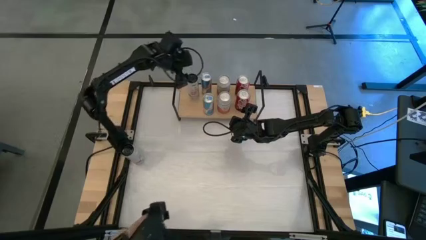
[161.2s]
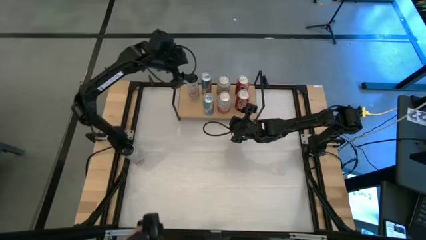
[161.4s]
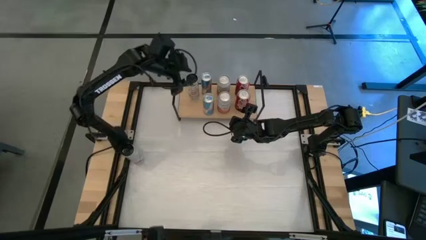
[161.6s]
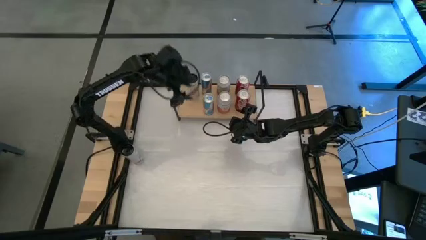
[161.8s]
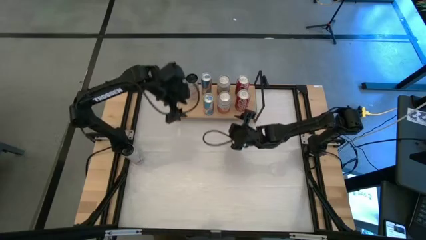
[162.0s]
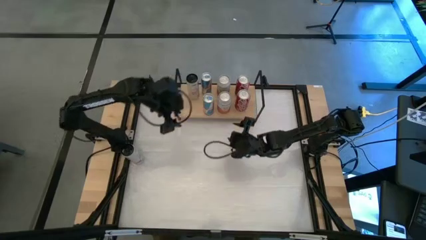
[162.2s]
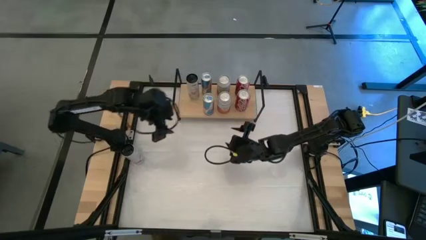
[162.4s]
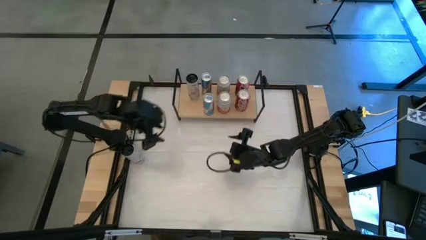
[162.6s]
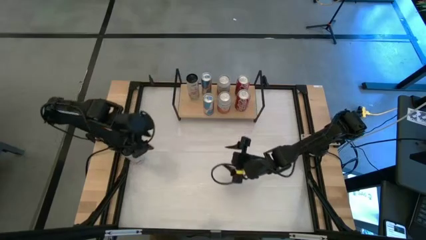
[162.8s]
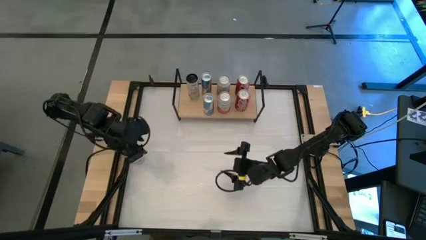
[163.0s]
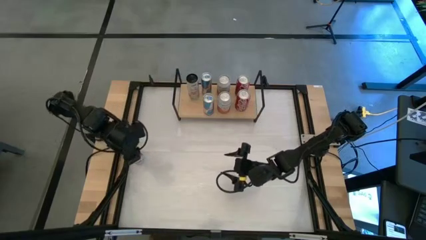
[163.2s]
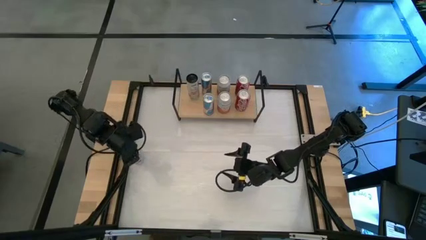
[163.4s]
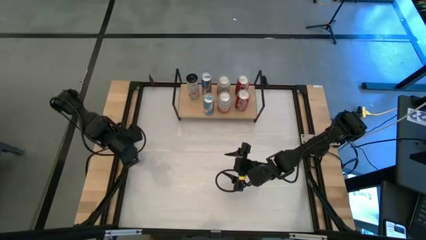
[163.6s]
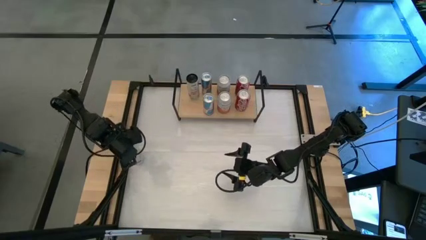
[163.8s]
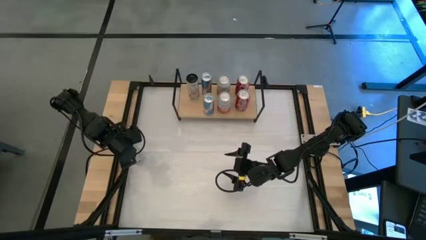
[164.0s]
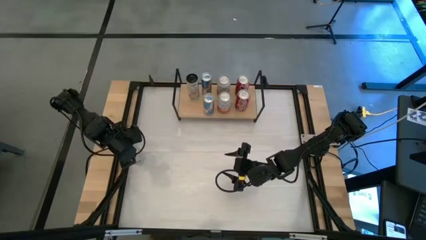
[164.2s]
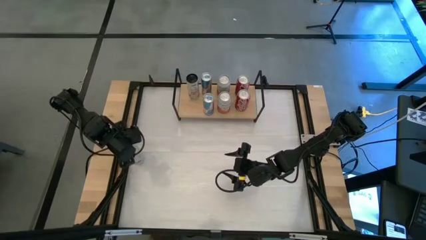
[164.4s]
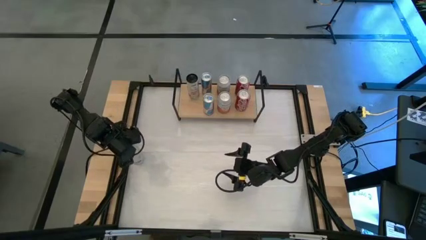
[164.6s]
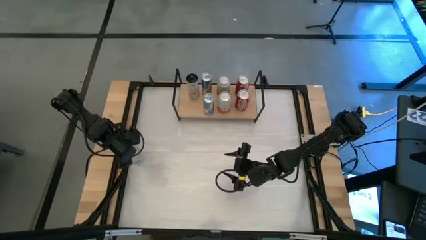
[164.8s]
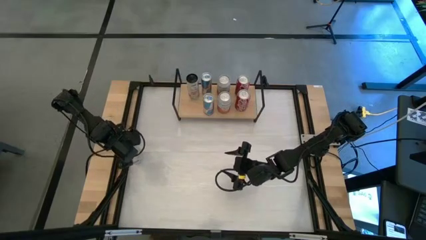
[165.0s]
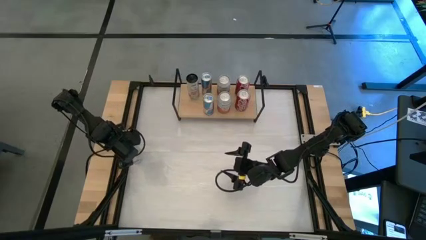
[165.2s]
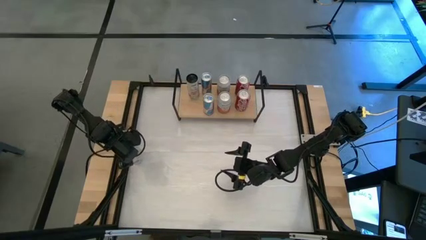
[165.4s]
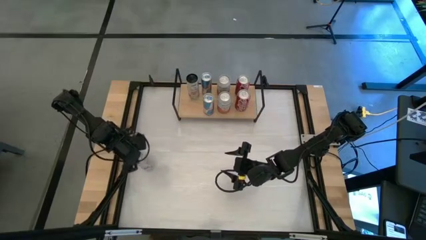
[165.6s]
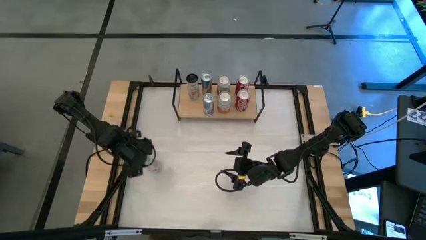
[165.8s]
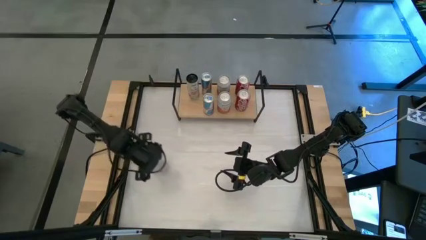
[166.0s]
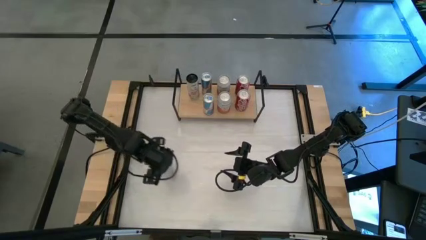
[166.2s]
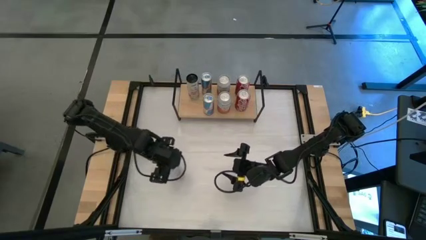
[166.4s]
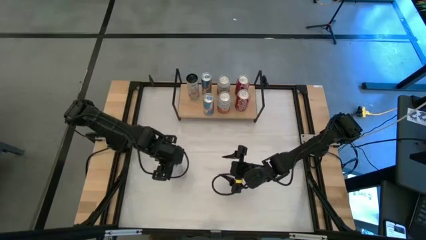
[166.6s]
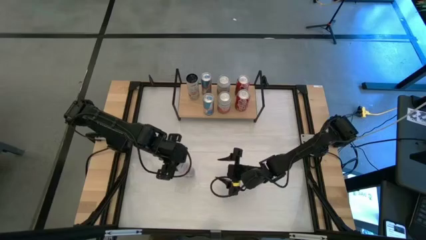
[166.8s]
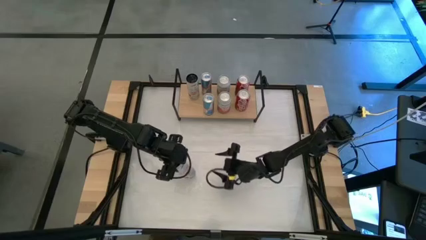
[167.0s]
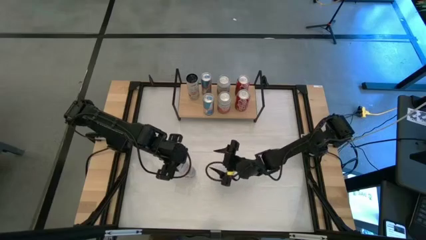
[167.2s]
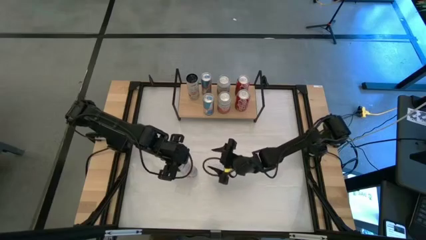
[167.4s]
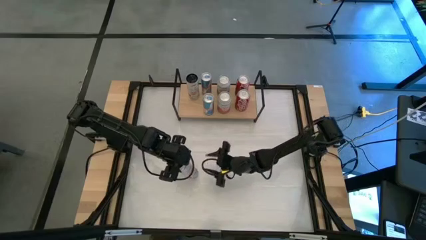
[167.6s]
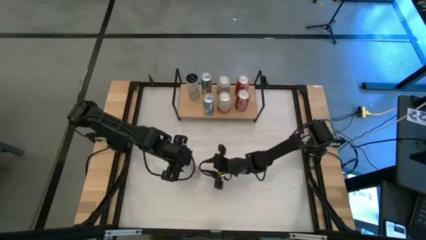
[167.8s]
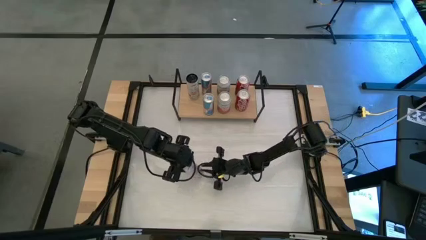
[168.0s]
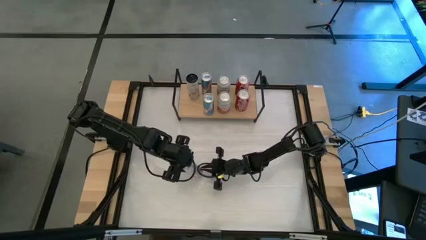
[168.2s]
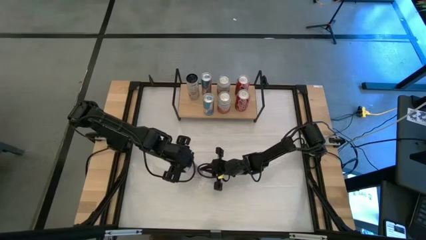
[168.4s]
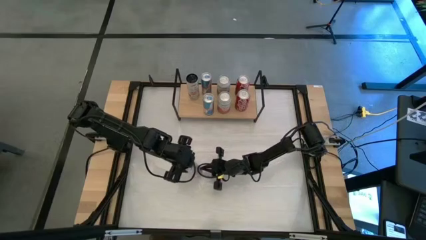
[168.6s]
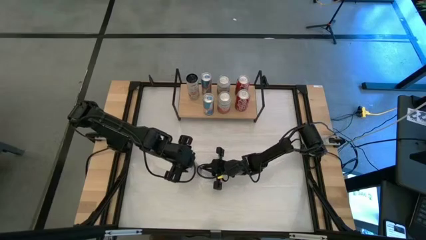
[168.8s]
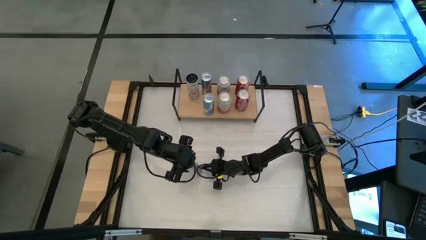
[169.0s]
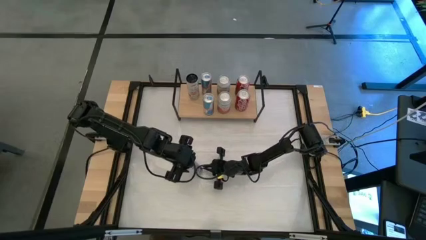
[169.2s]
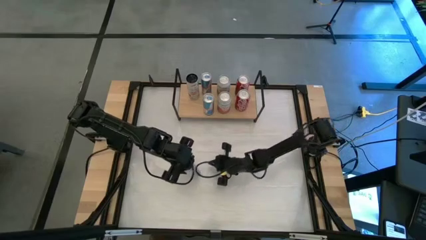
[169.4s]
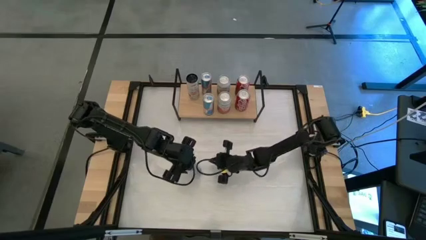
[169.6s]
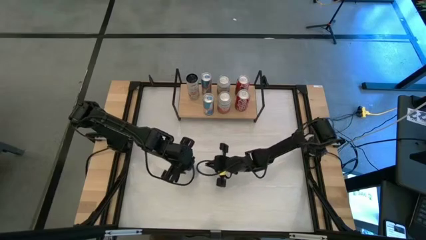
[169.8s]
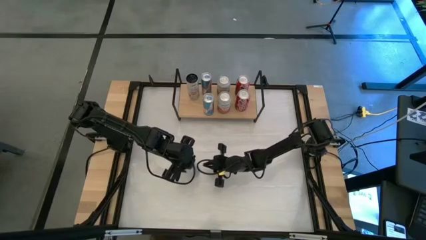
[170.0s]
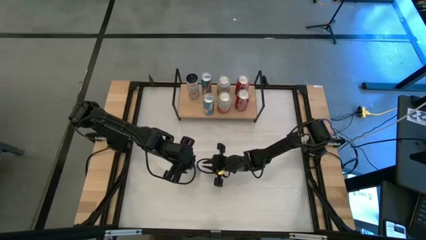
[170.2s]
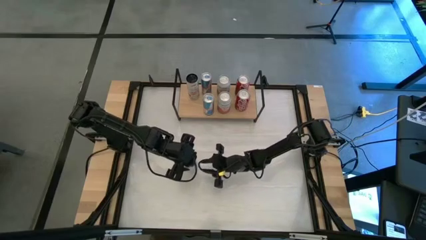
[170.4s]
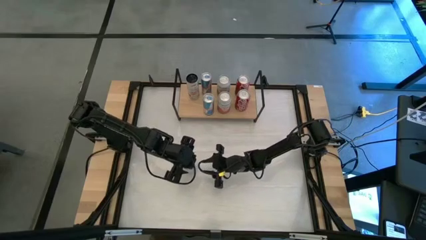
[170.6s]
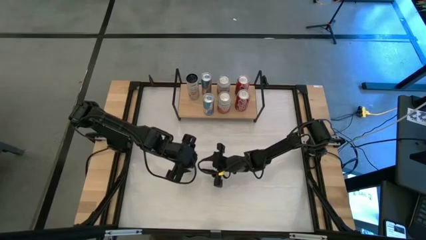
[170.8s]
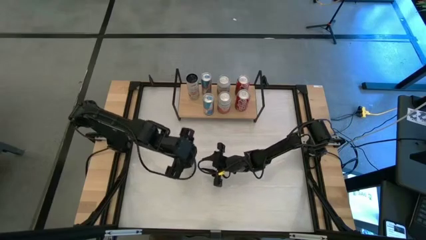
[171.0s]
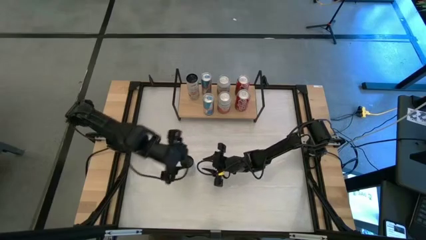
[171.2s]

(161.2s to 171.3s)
Task: Place canned beverage on shelf
Put the white pink soda can align with the other white pink soda can on the shelf

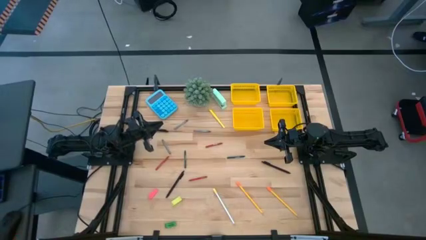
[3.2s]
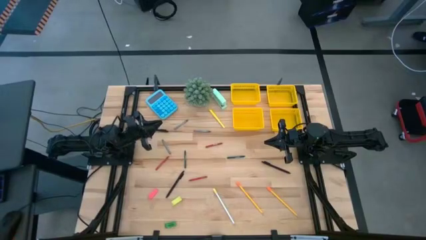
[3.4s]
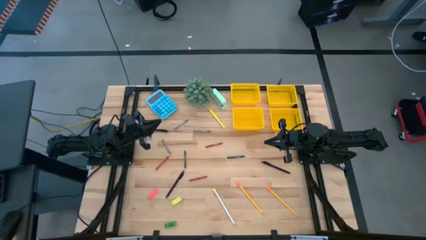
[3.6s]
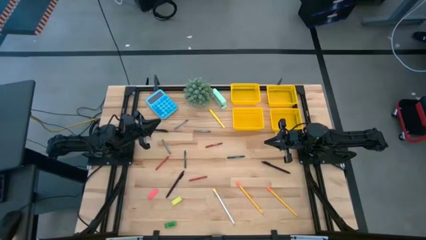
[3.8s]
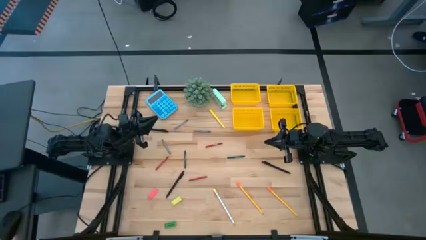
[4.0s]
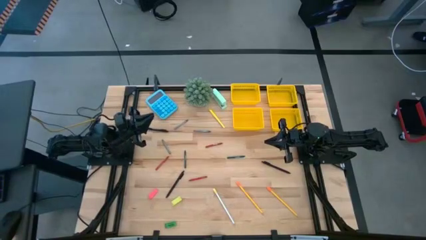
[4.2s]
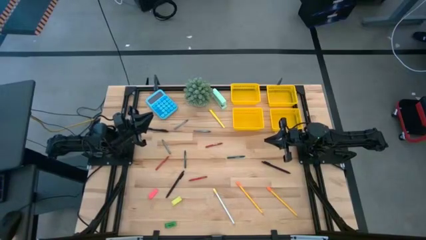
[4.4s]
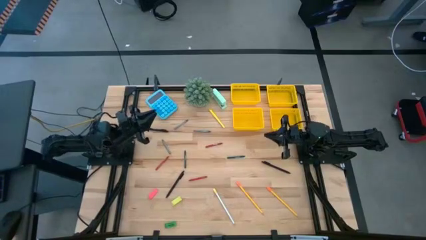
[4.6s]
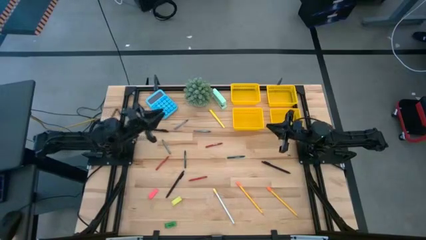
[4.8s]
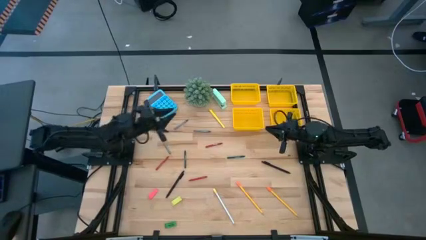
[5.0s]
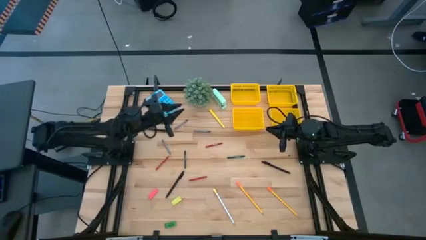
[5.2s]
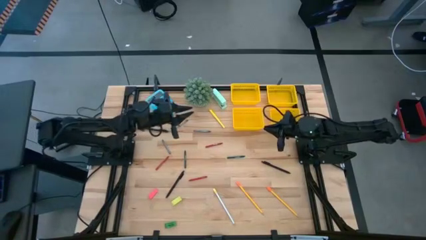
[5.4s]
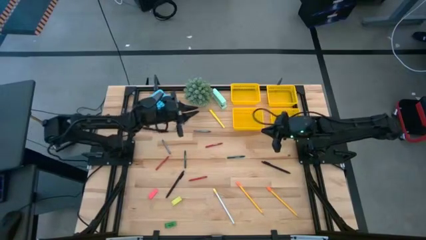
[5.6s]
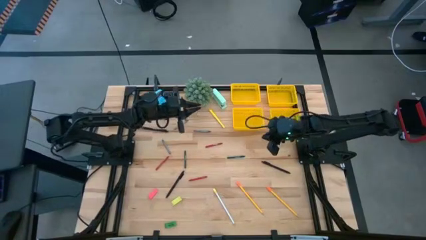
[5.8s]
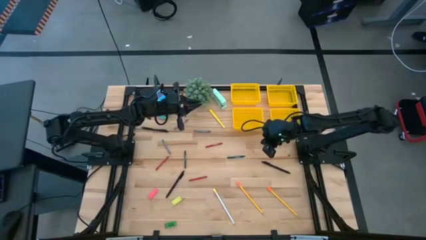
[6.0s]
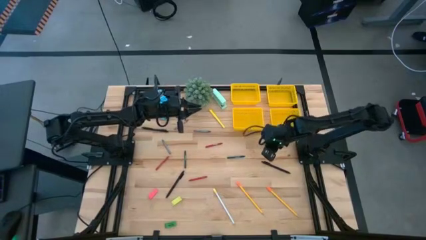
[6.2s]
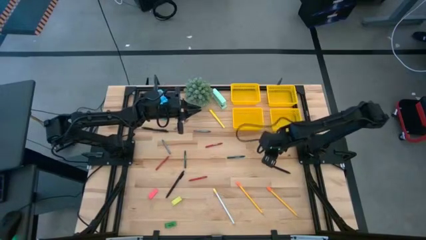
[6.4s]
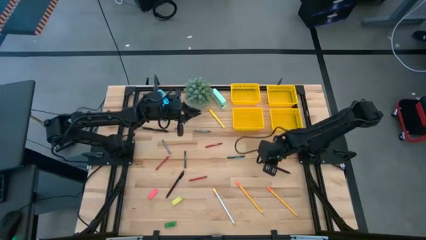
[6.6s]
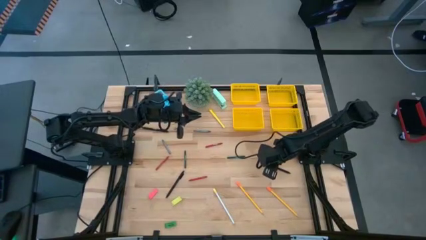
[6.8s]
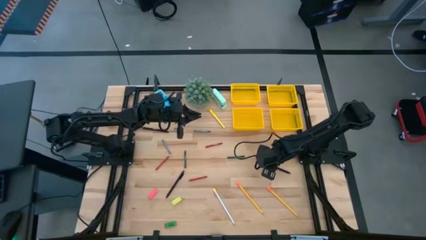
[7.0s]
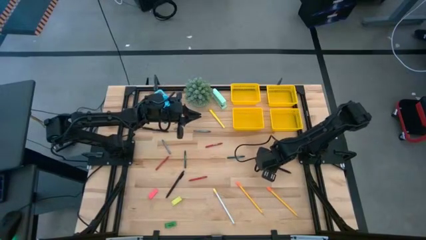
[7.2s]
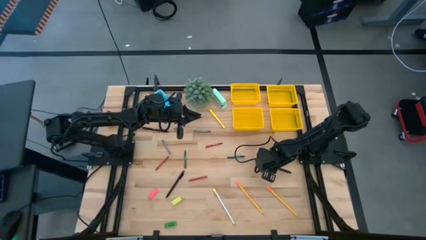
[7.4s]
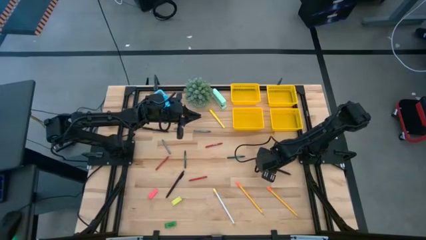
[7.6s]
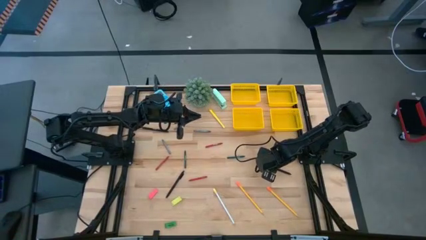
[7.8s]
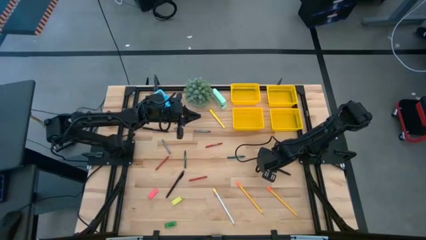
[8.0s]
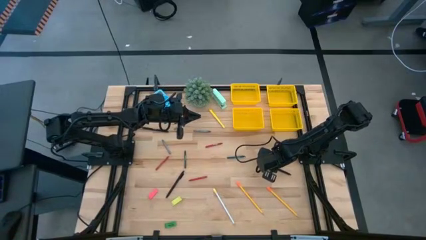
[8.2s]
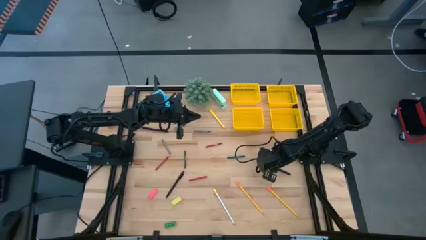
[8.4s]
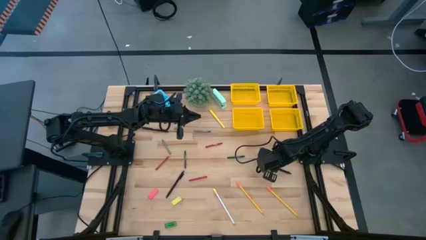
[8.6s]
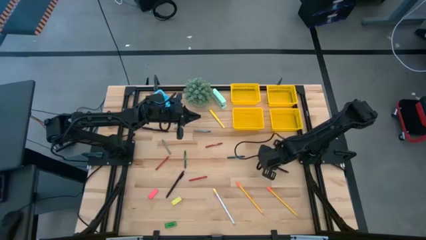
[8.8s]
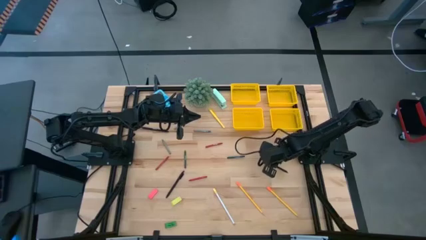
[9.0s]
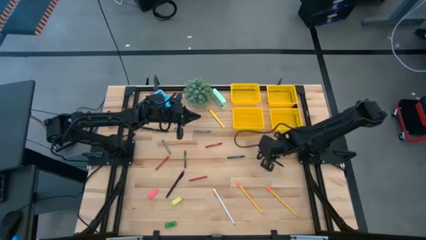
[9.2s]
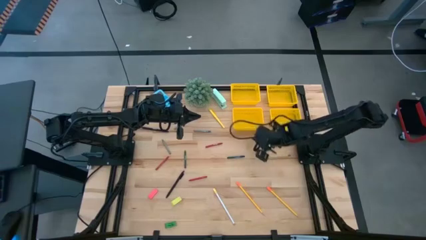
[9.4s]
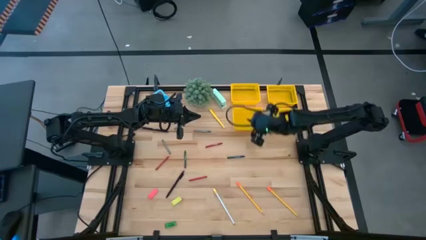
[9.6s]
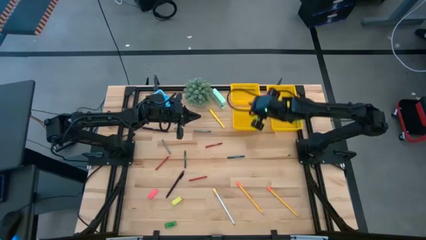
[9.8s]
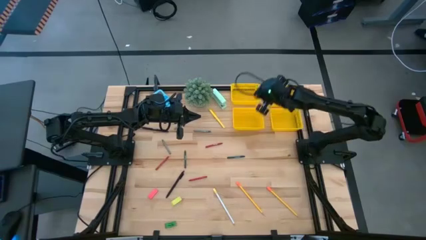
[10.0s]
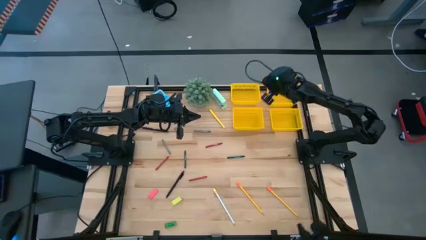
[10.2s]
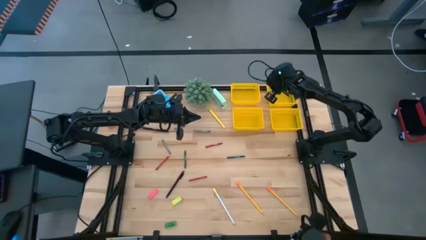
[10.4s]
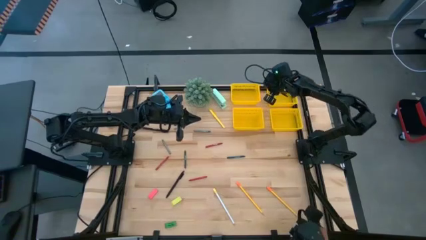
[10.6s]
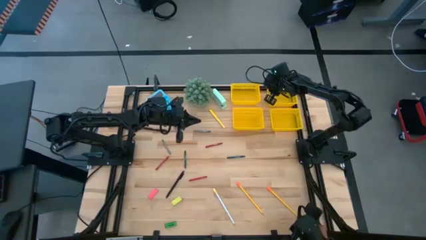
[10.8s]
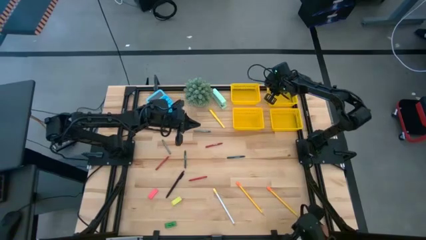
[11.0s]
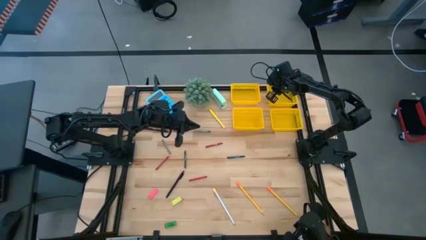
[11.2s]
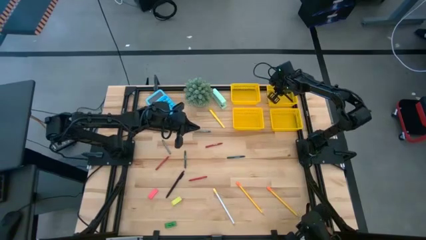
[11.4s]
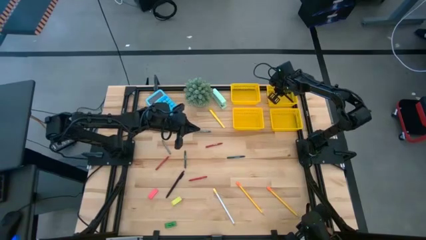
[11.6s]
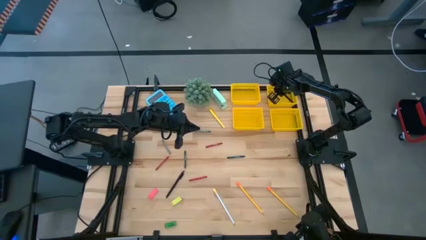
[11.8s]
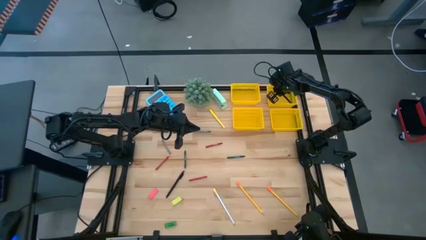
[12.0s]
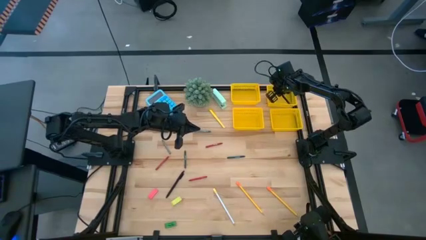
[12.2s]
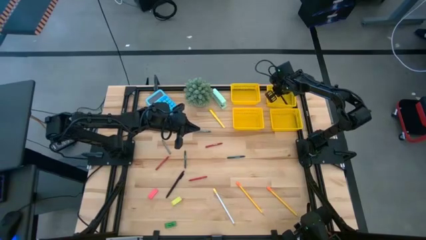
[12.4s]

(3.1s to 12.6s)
Task: Sort crayons/erasers/pens/pencils in bins
Put the bottom right black pen into the top right yellow bin
